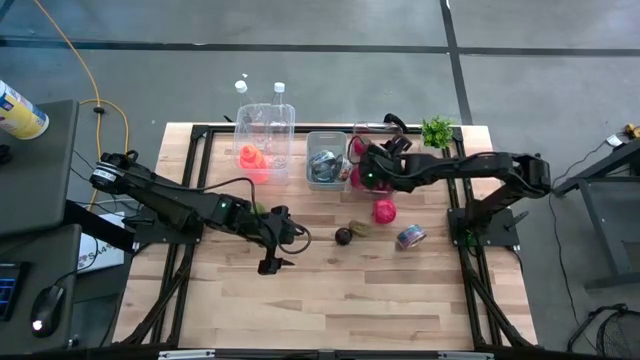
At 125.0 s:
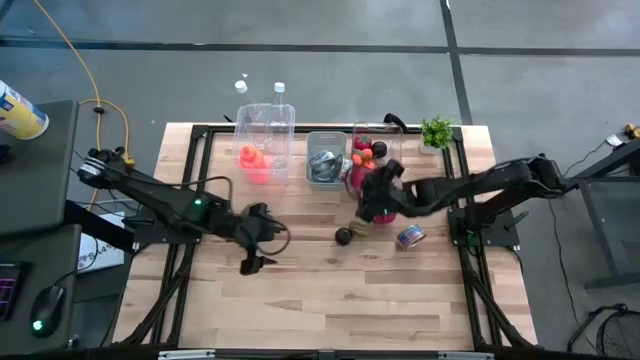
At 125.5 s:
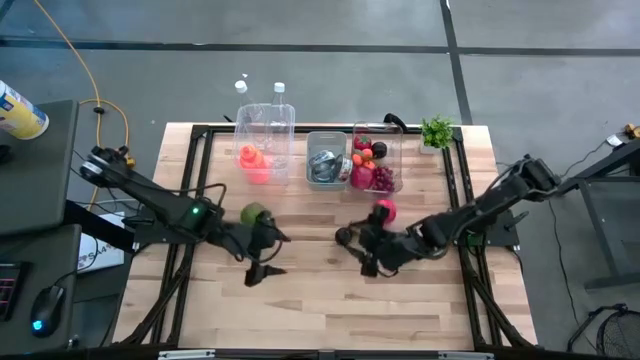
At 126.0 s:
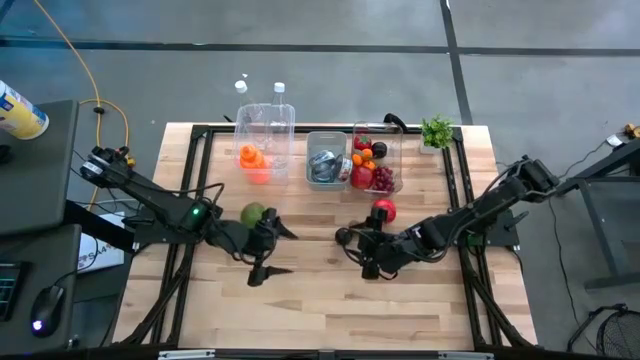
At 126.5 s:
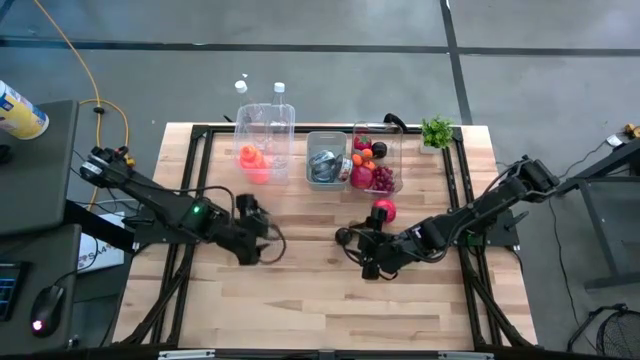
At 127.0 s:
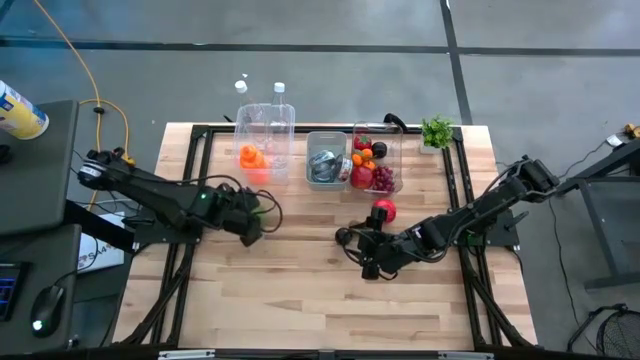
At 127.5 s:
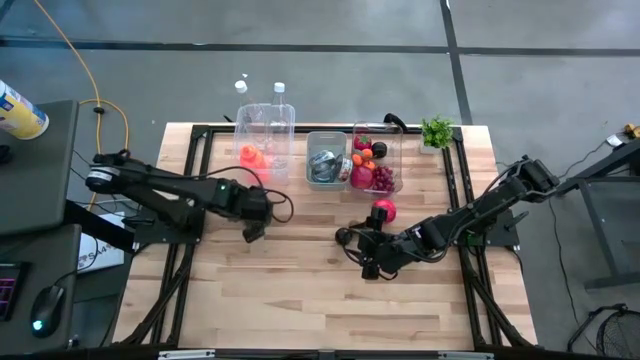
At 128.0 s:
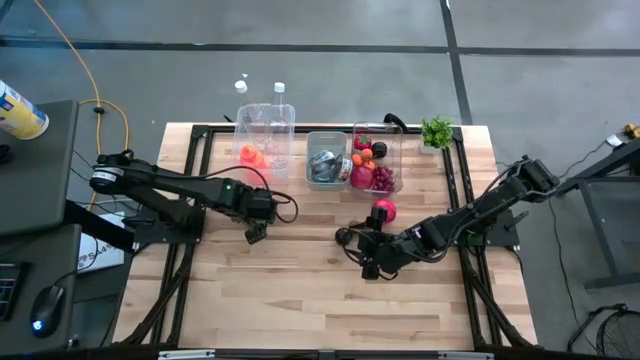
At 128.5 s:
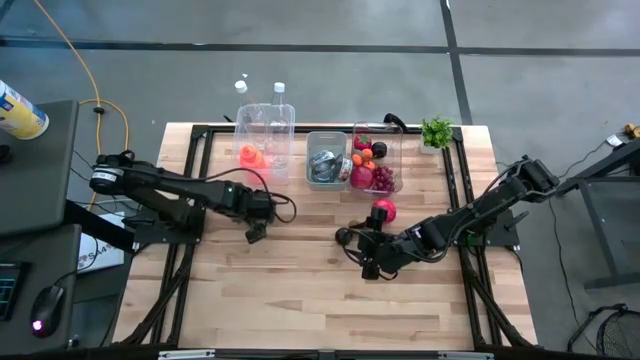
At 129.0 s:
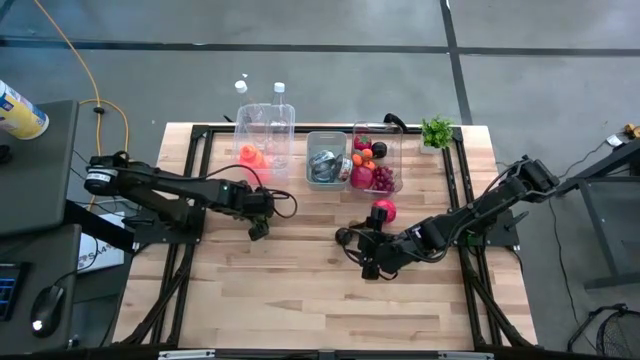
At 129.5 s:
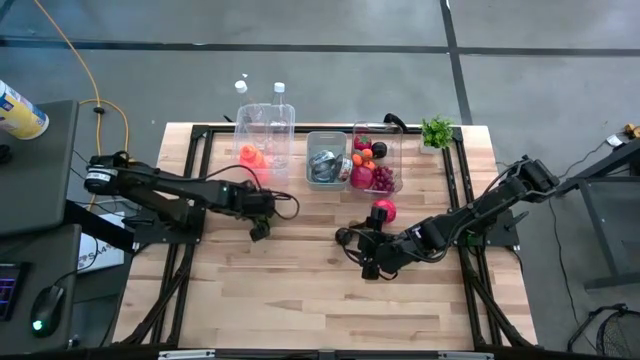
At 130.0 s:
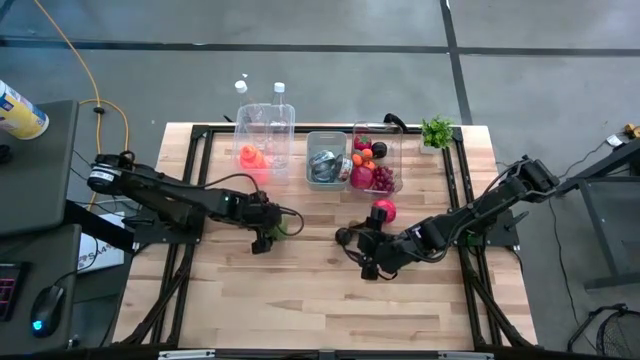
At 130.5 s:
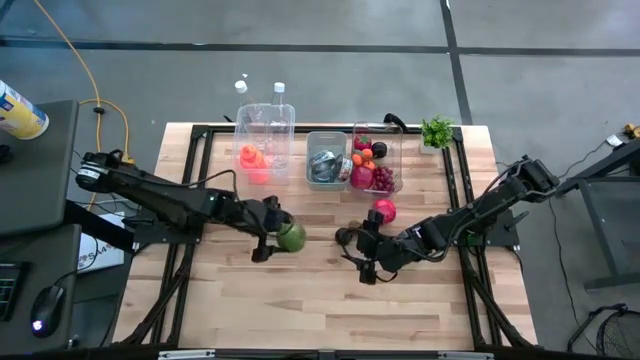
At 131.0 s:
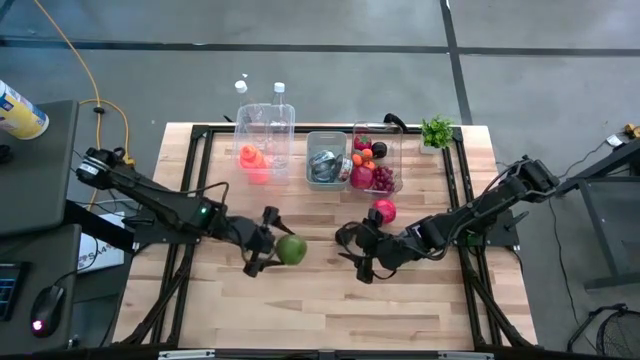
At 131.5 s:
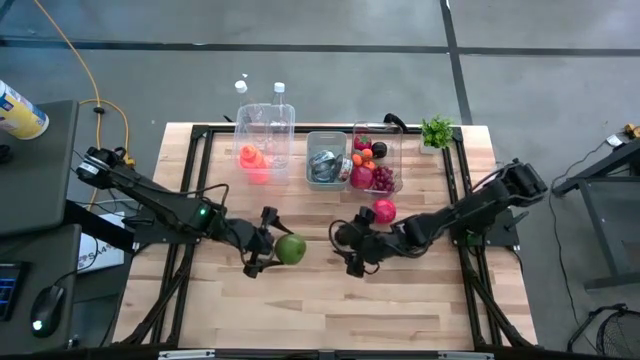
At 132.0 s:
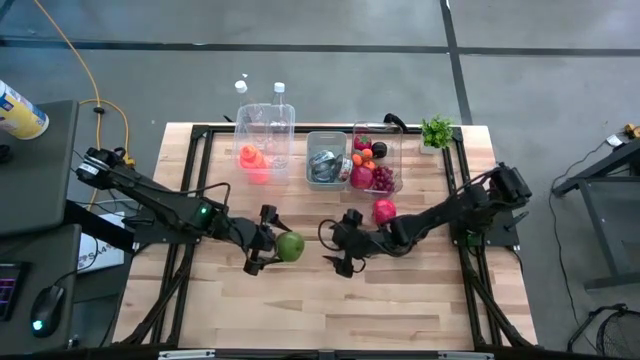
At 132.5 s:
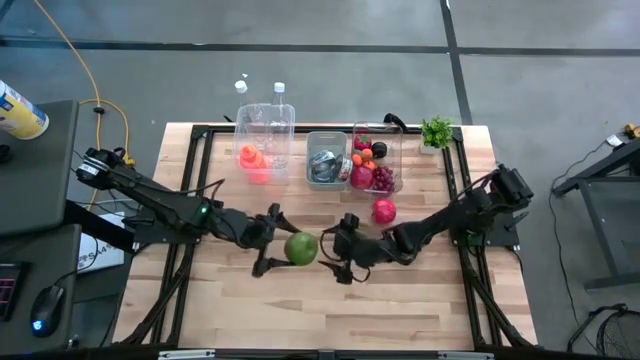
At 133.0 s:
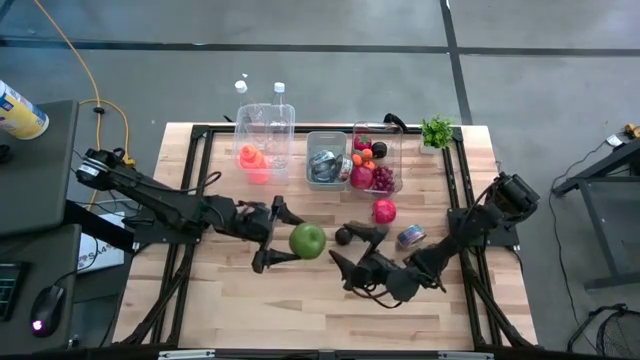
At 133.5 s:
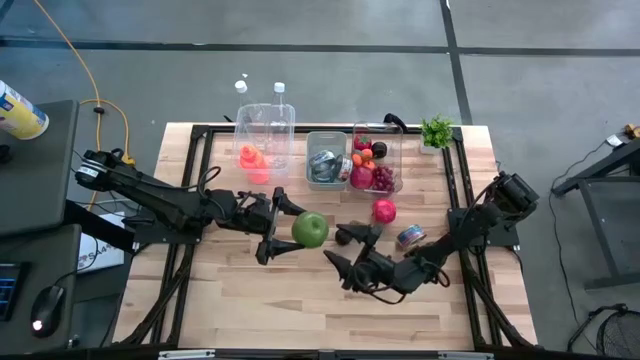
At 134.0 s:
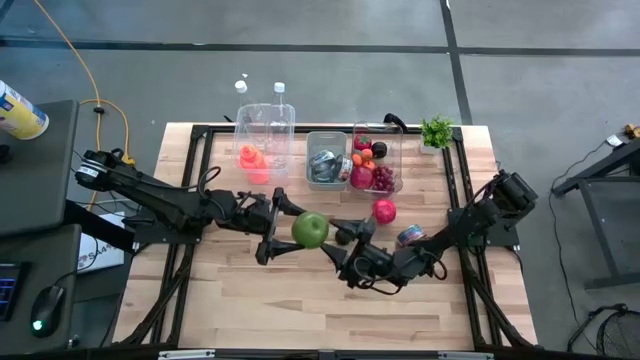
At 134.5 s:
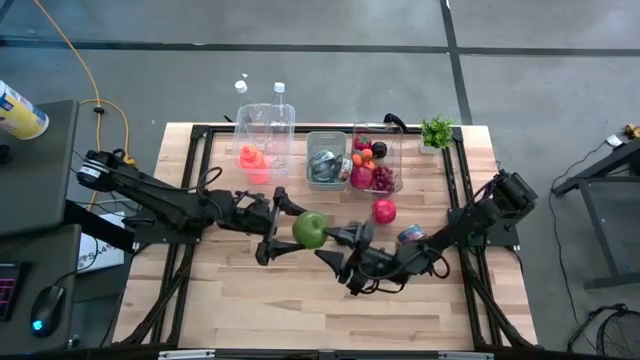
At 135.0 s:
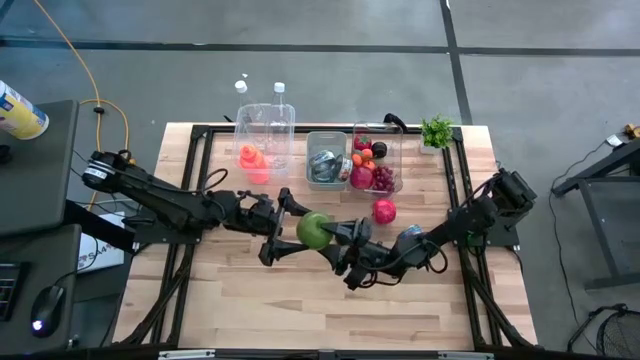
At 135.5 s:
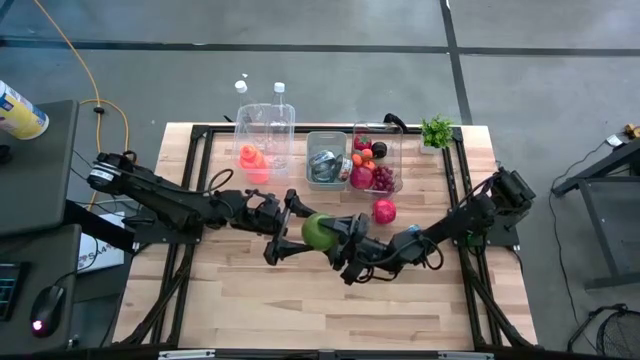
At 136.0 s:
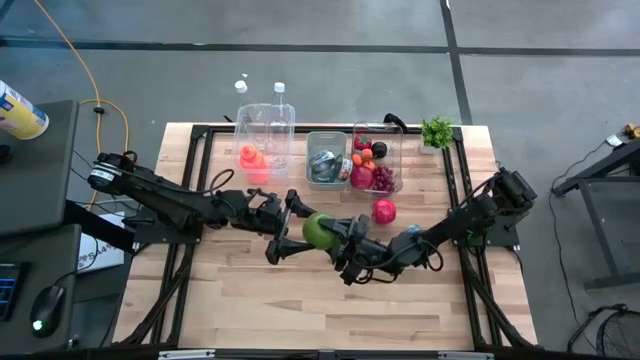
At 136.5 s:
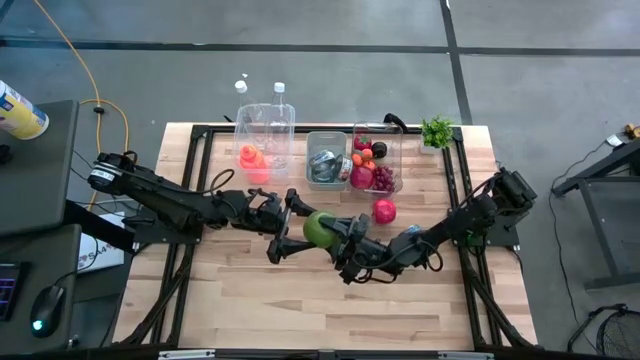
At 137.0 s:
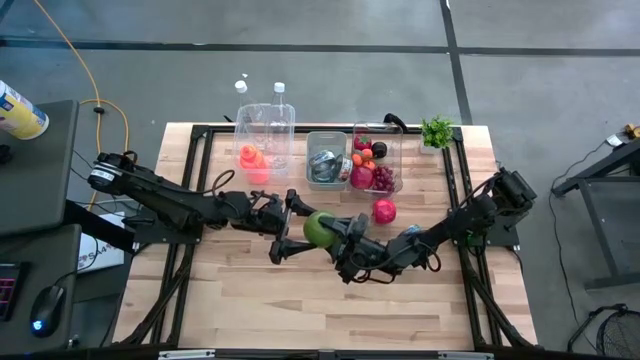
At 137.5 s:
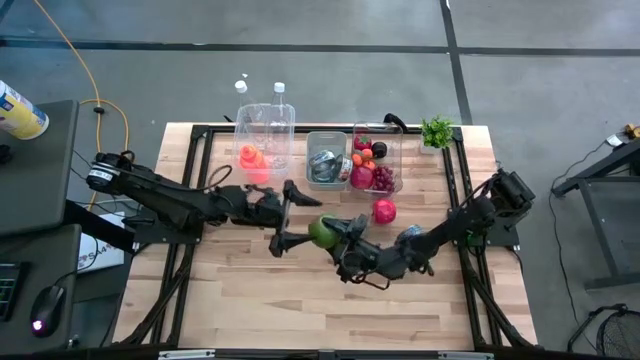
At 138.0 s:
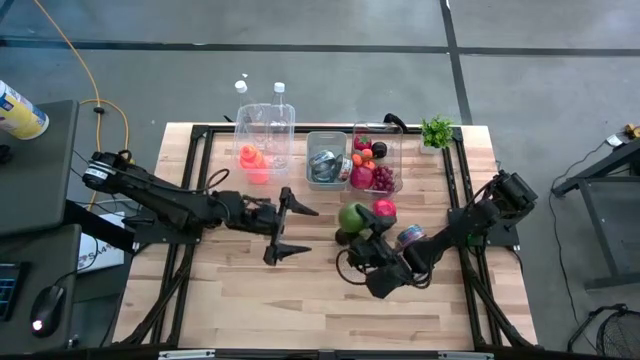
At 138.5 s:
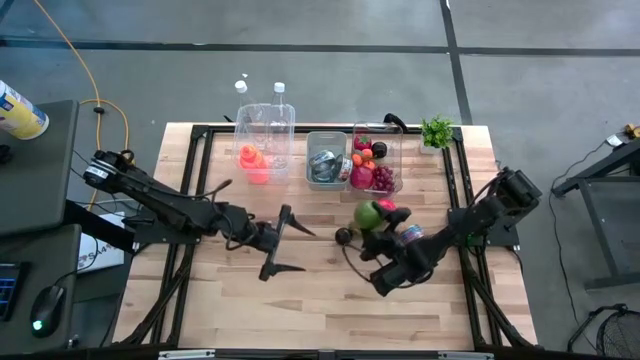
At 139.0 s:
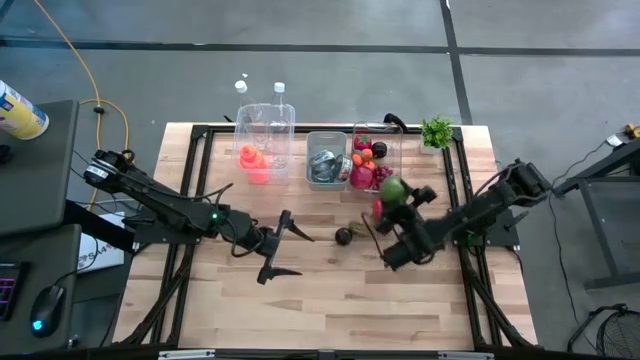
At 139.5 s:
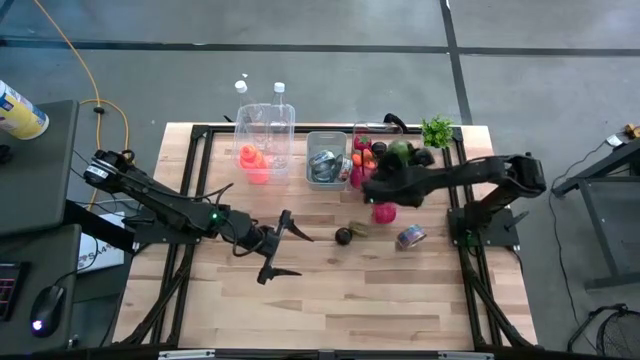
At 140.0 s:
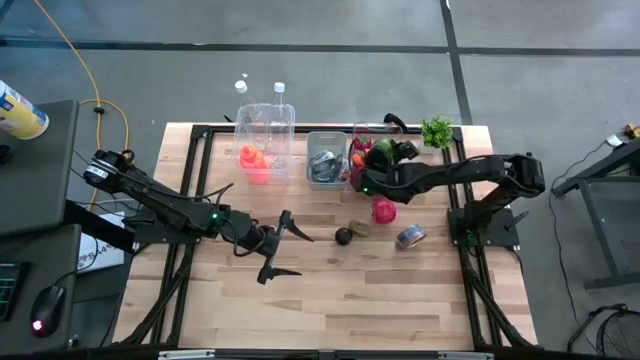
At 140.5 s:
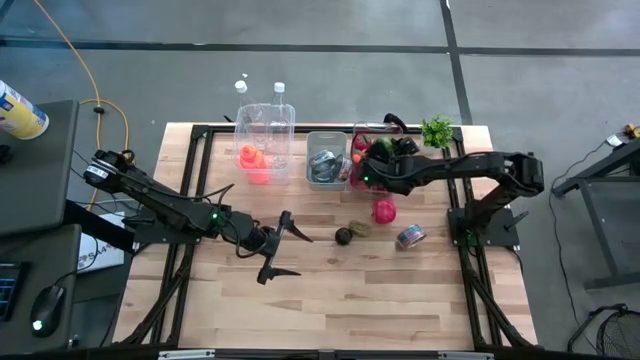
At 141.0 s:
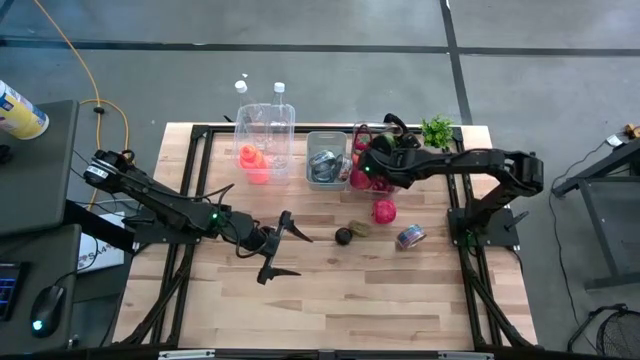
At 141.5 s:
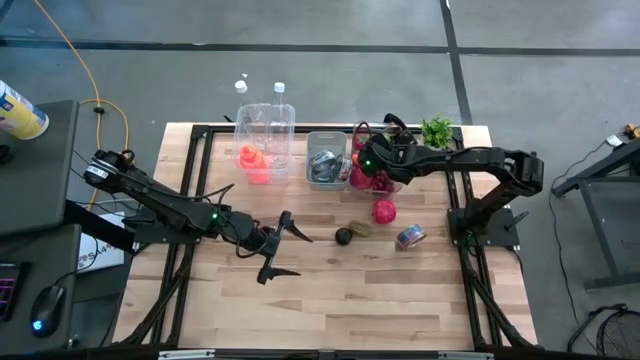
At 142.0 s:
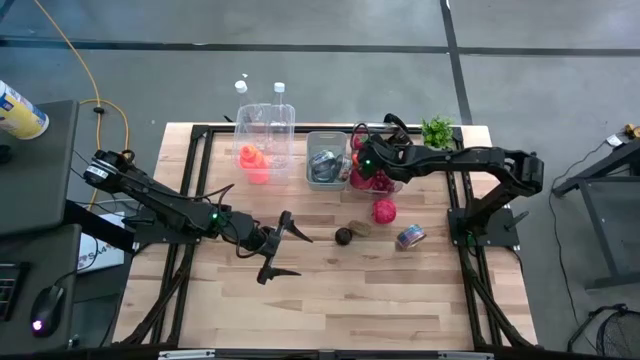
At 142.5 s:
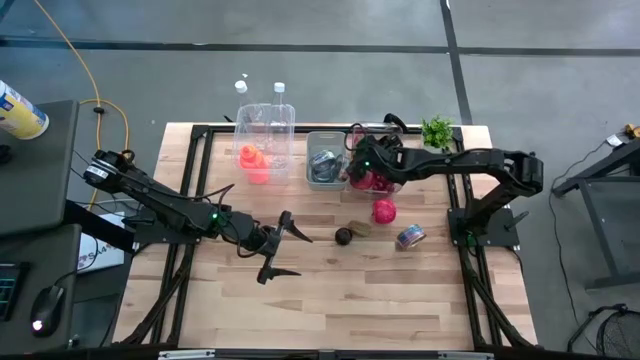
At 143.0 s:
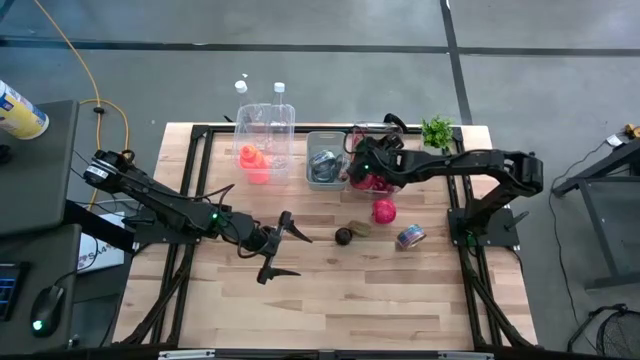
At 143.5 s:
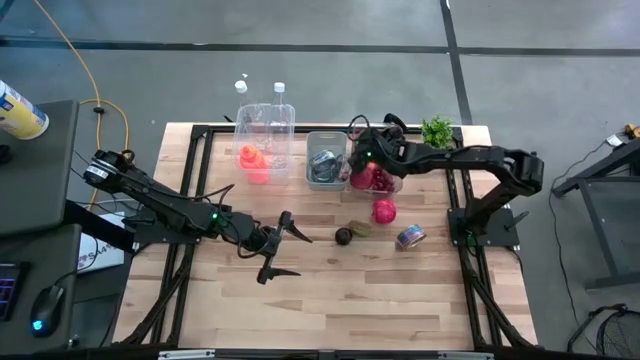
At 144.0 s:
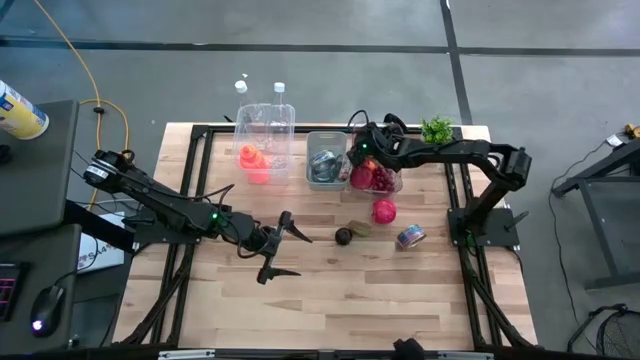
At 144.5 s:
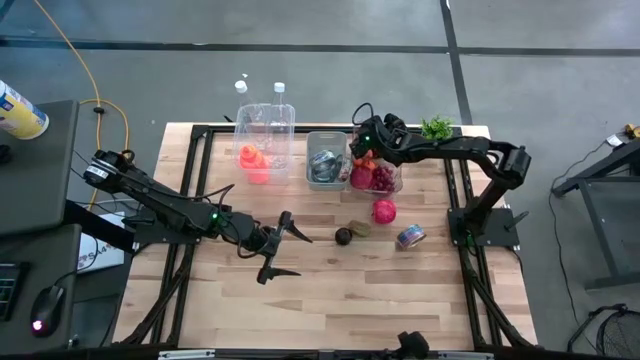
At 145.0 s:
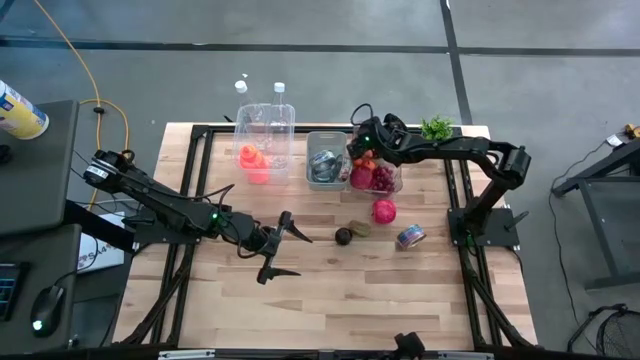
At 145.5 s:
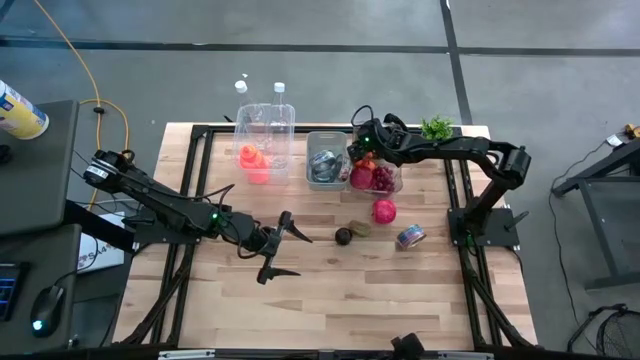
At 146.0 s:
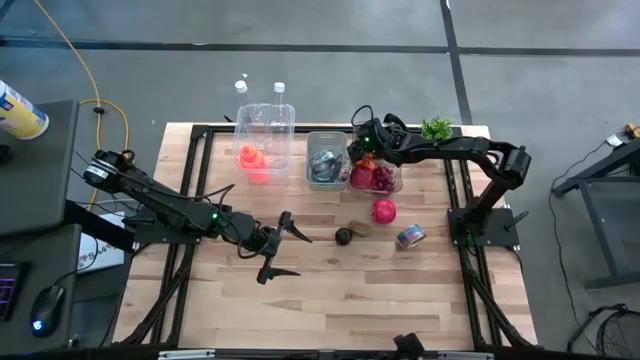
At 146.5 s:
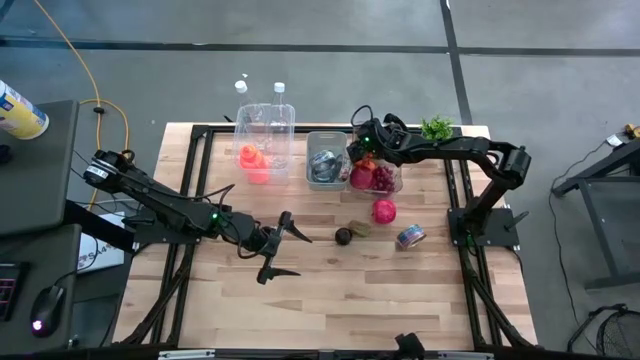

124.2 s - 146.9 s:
Task: Pick & Place Food Item
Put the green apple into the transparent bin
